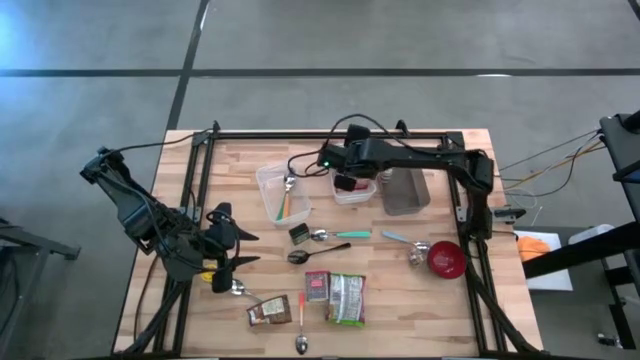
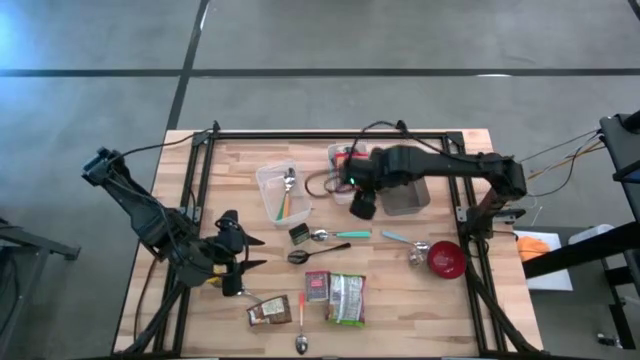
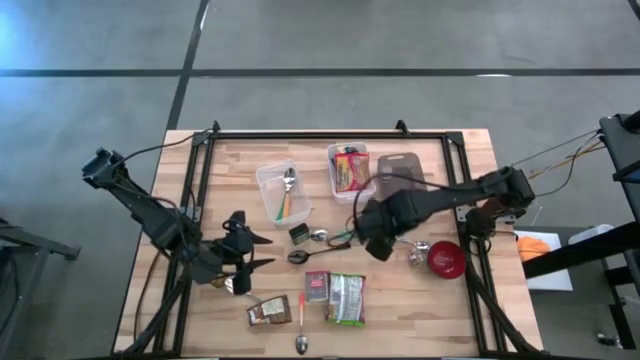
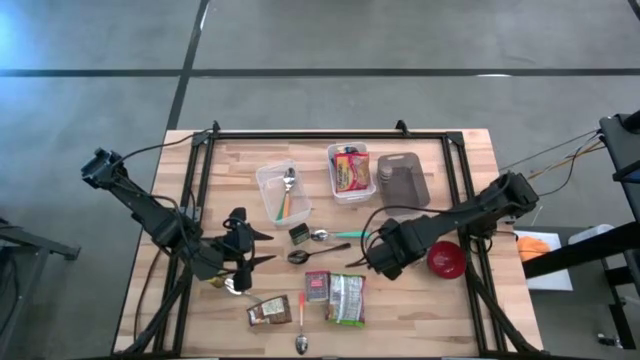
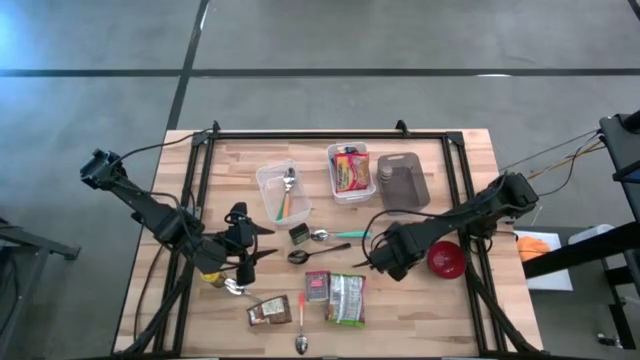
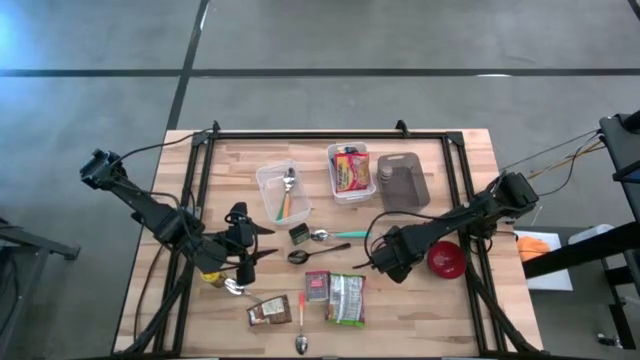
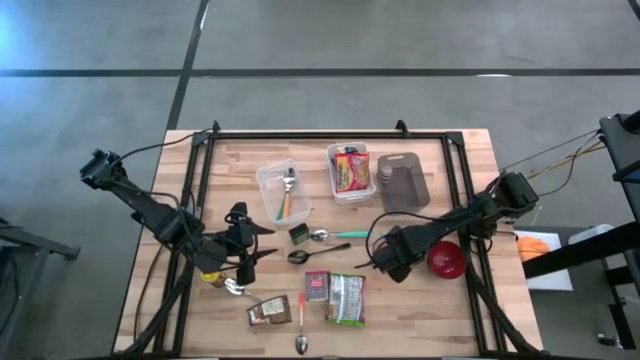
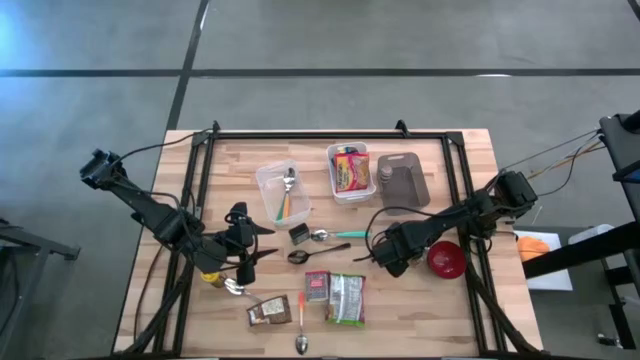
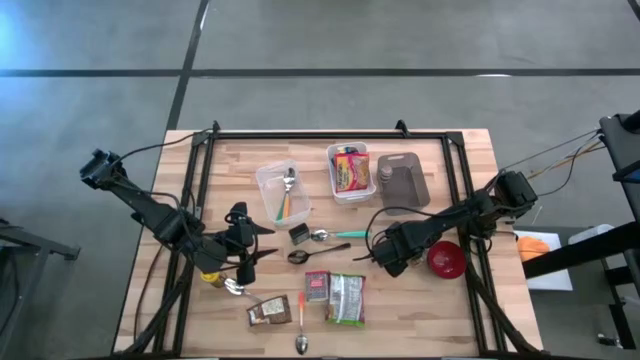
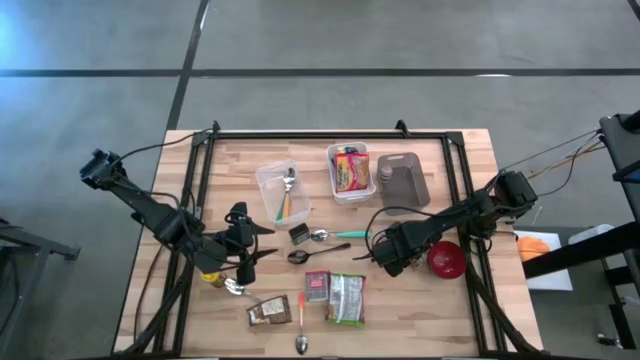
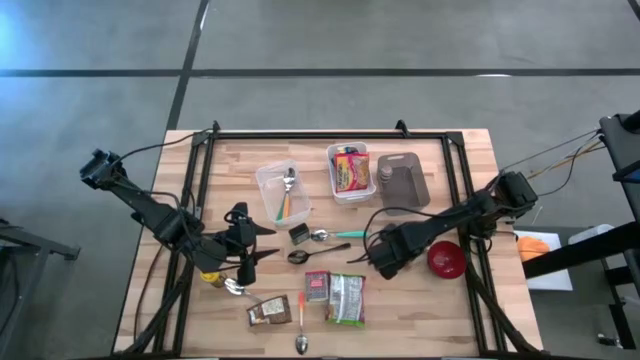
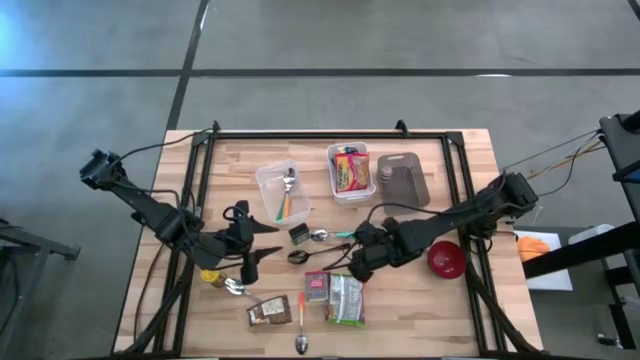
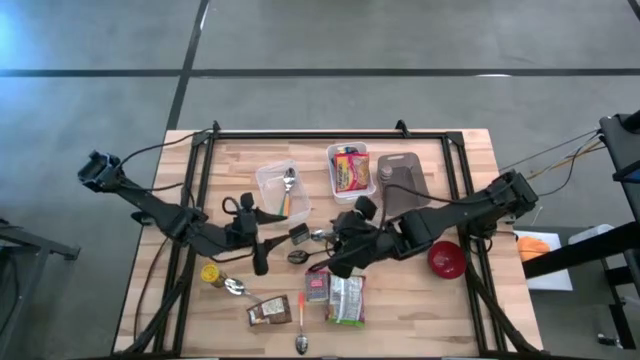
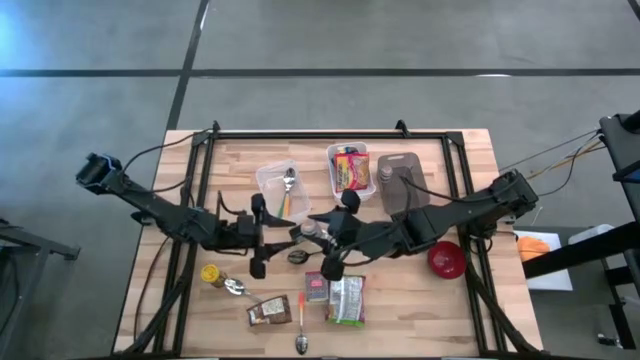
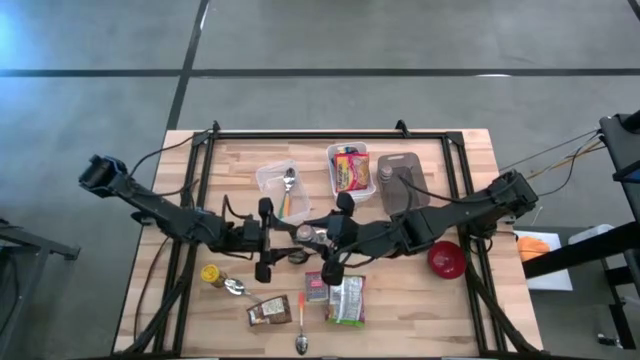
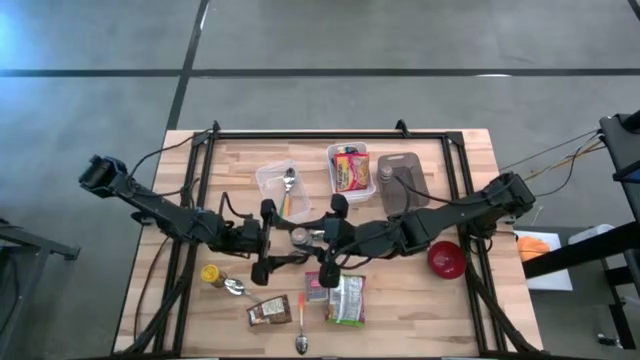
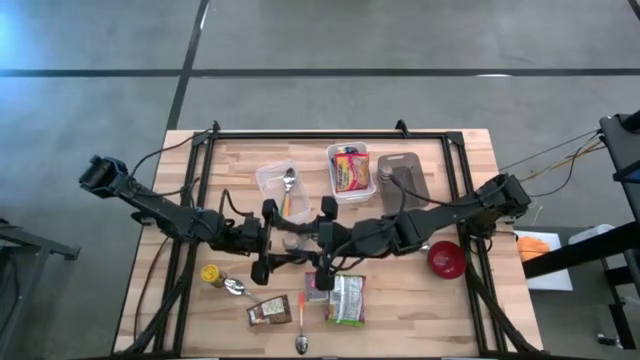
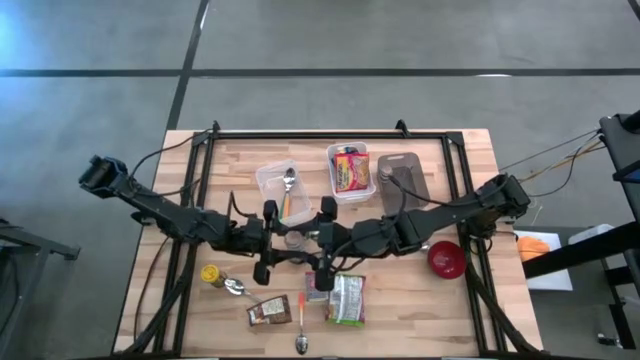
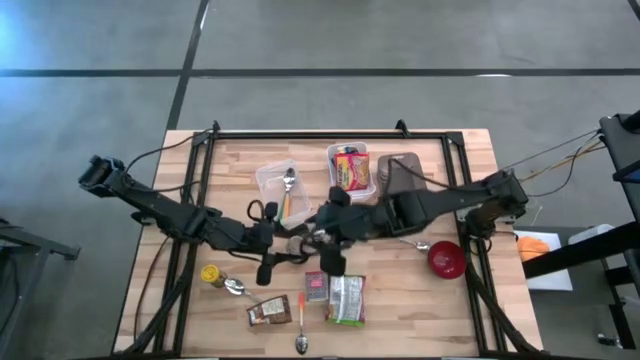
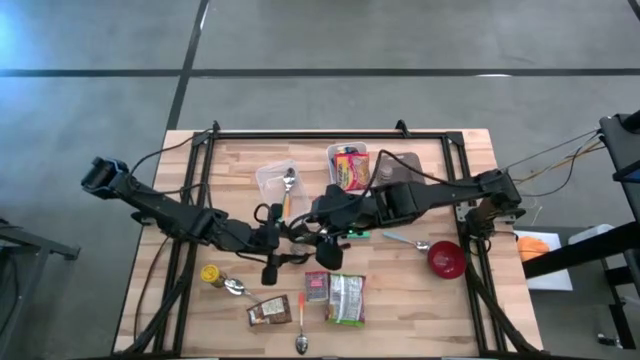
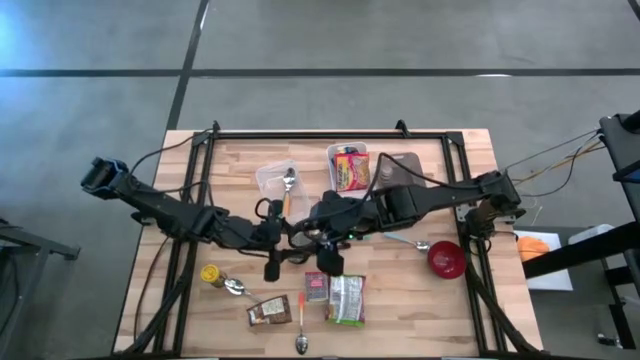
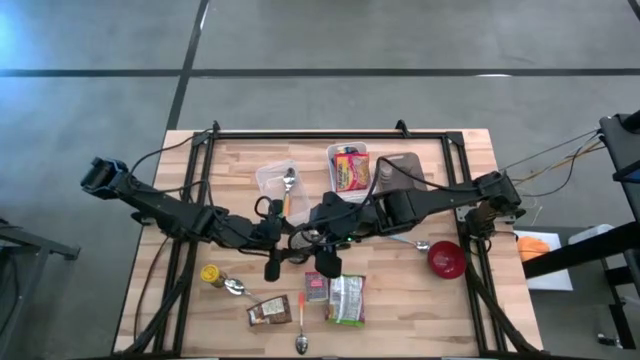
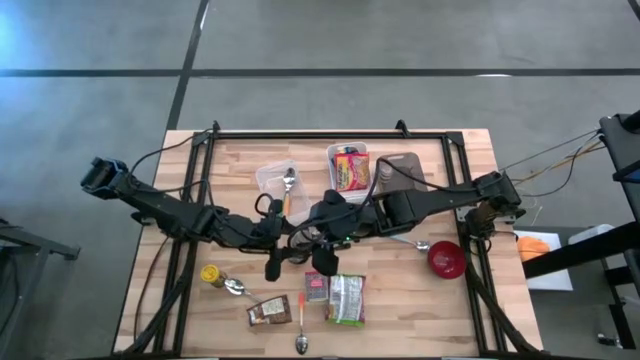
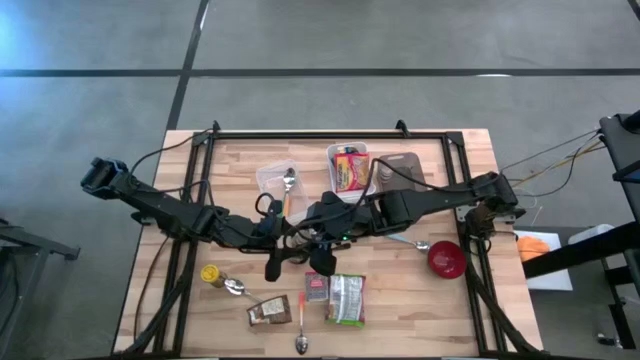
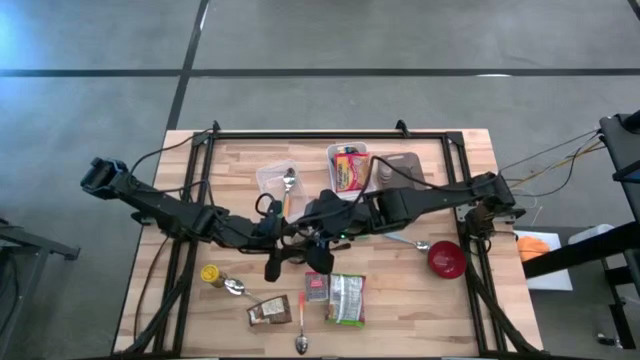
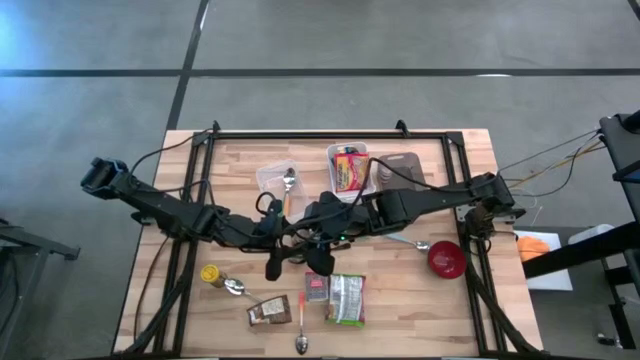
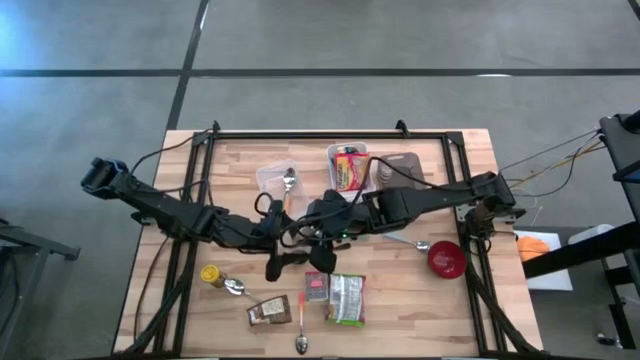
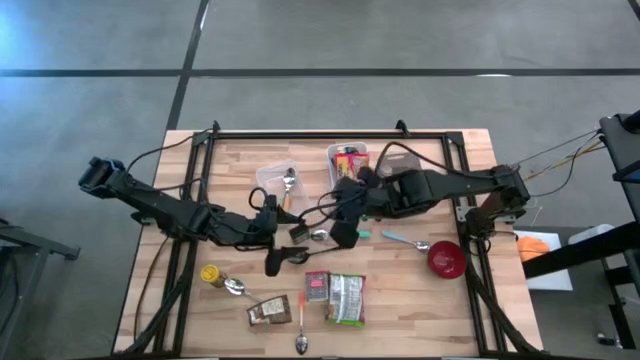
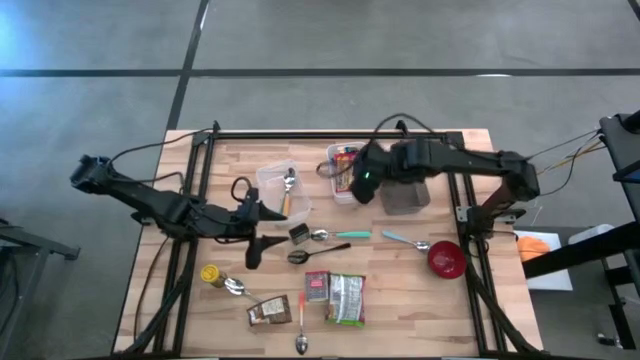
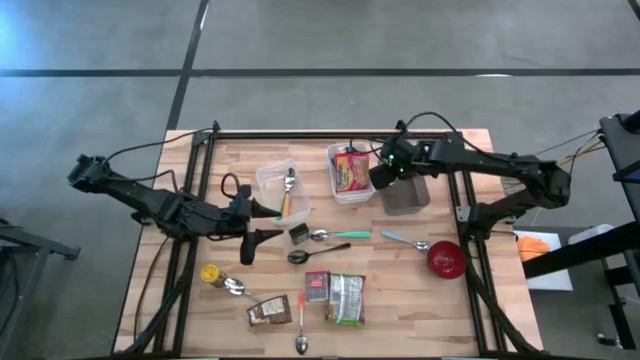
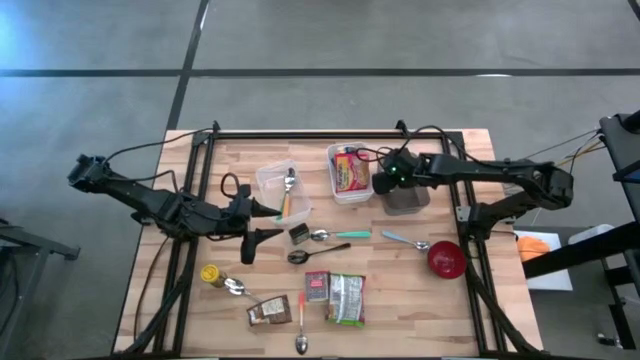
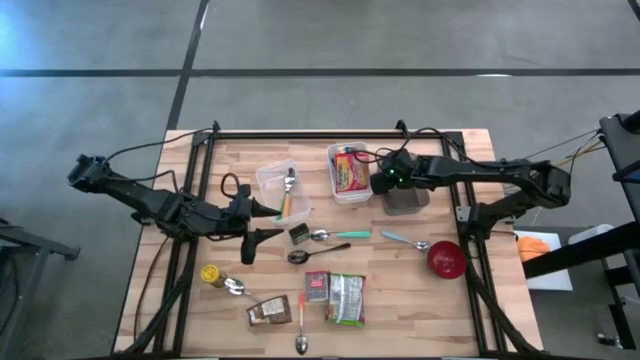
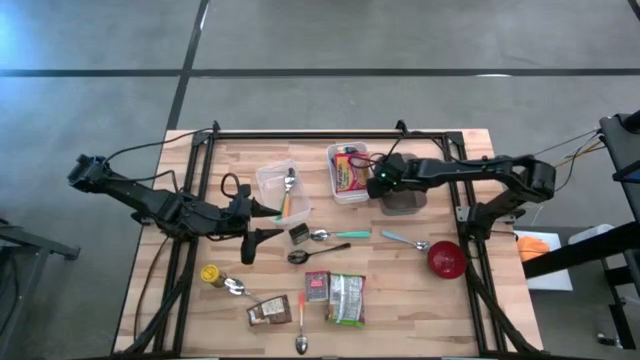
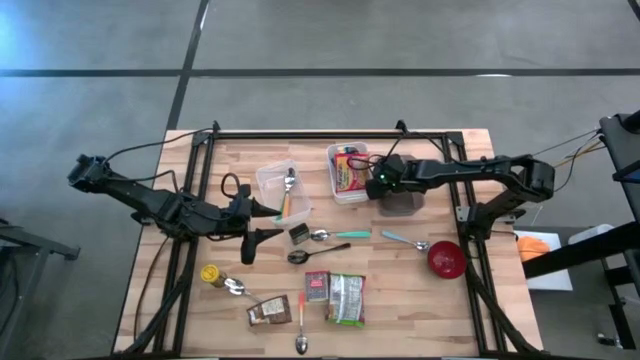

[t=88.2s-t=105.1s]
Put the brown seasoning bottle into the black bin

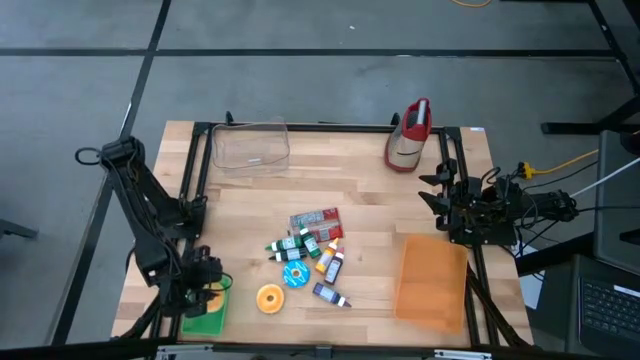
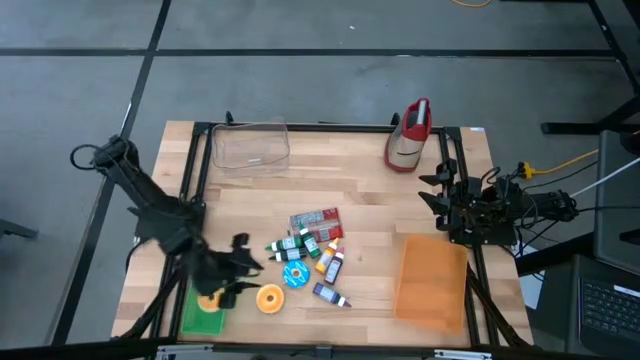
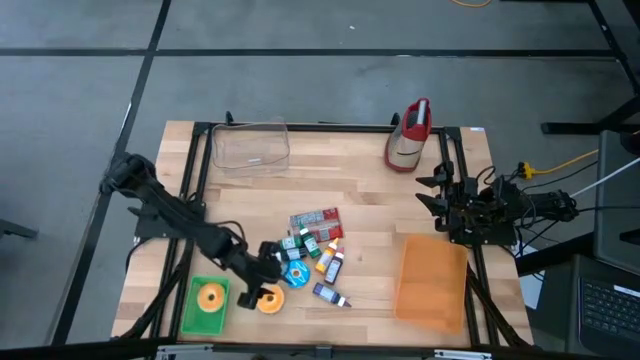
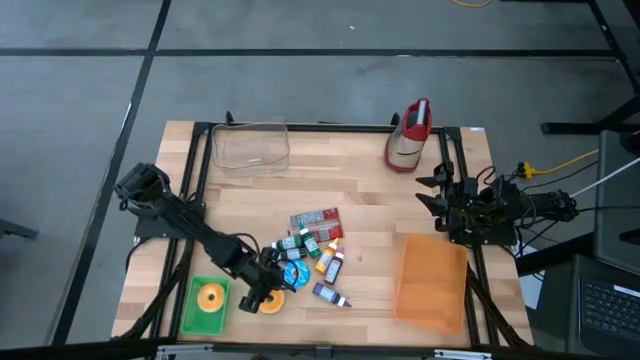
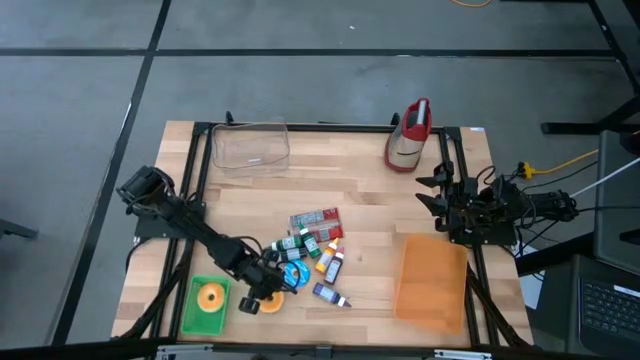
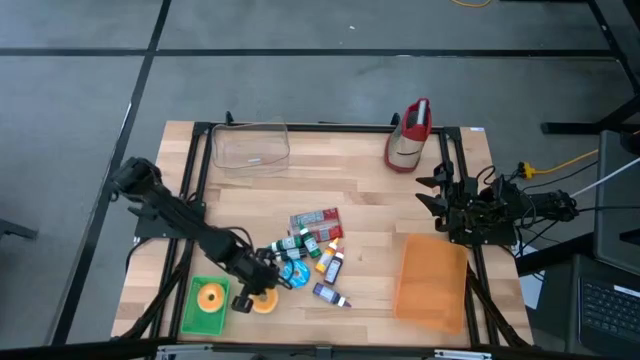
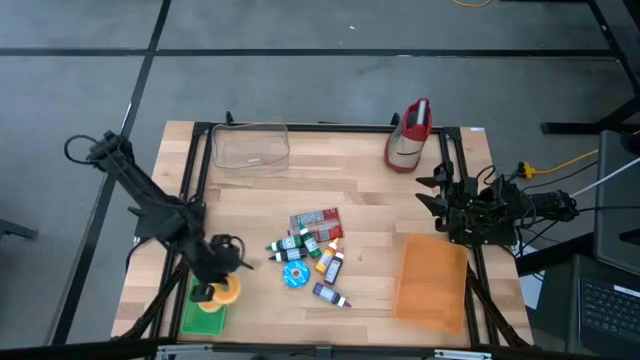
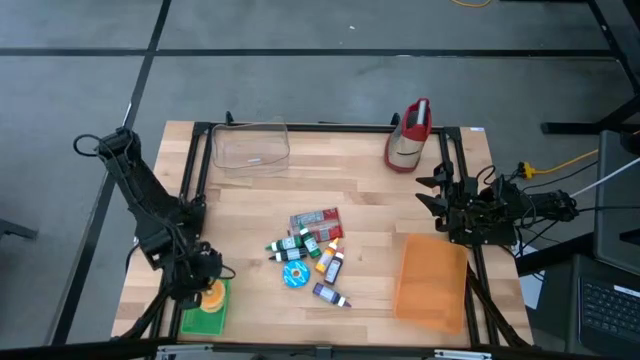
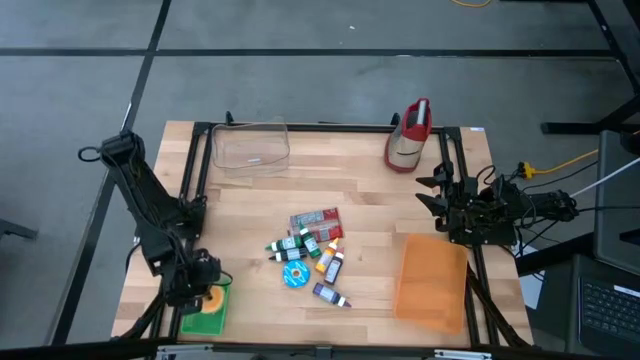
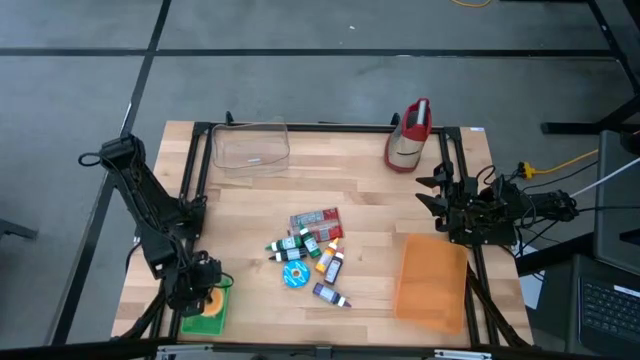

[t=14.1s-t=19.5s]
Put the yellow donut into the green bin
